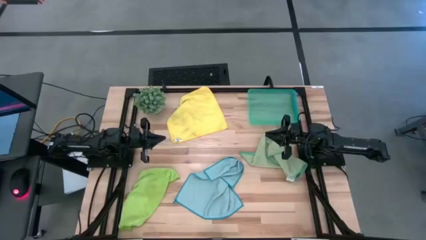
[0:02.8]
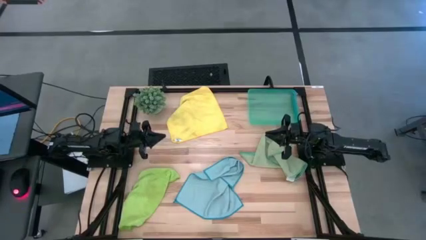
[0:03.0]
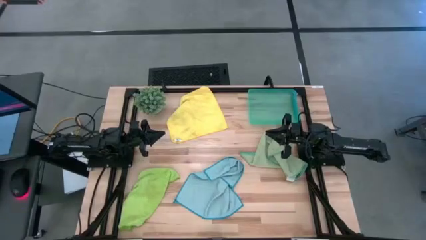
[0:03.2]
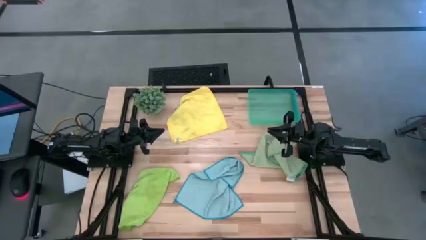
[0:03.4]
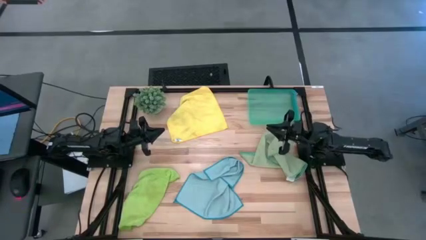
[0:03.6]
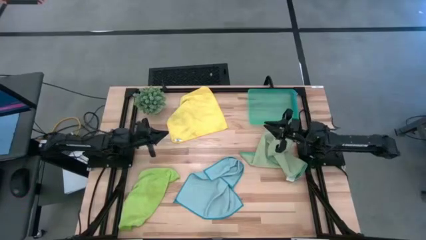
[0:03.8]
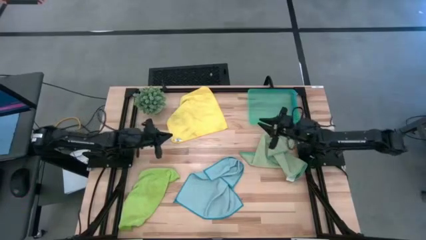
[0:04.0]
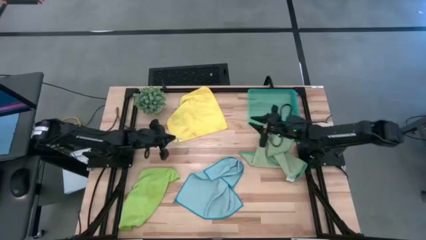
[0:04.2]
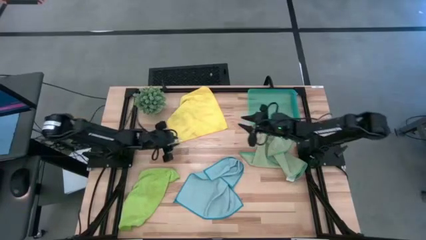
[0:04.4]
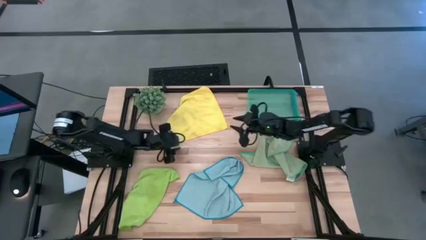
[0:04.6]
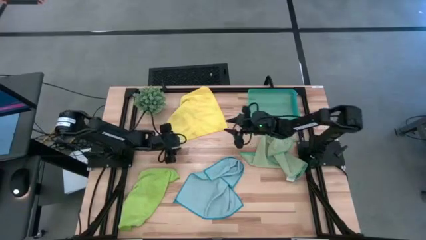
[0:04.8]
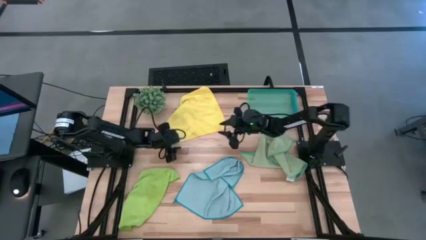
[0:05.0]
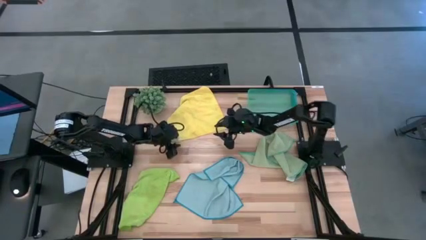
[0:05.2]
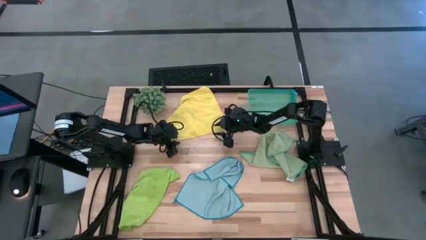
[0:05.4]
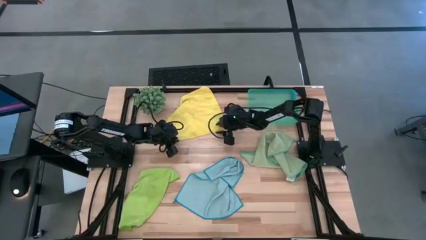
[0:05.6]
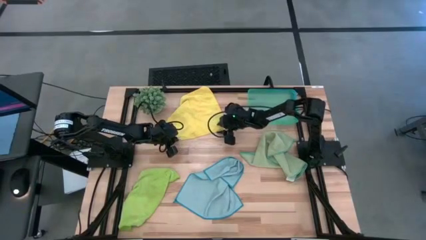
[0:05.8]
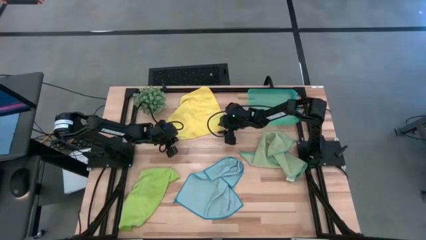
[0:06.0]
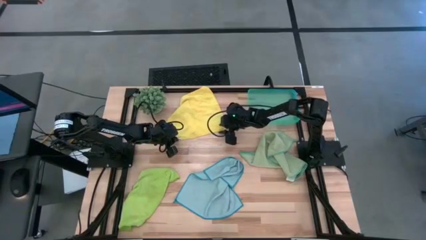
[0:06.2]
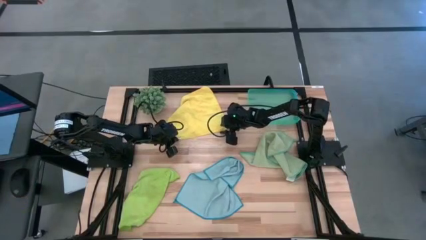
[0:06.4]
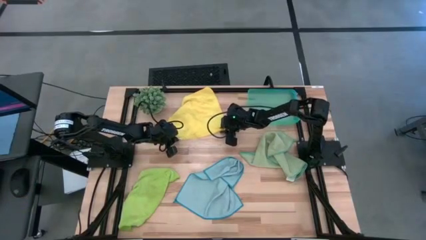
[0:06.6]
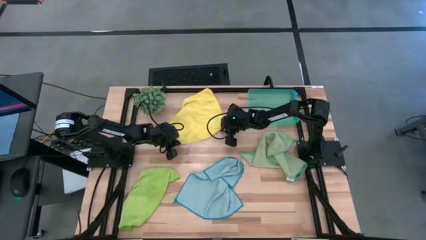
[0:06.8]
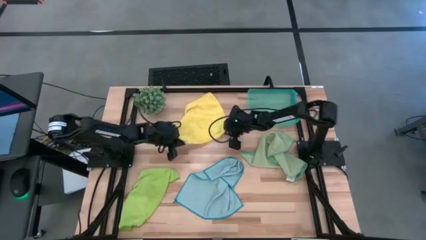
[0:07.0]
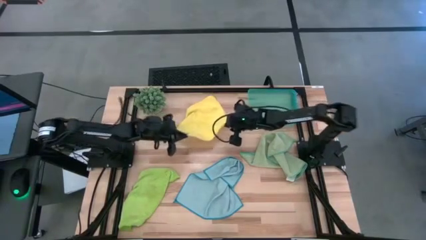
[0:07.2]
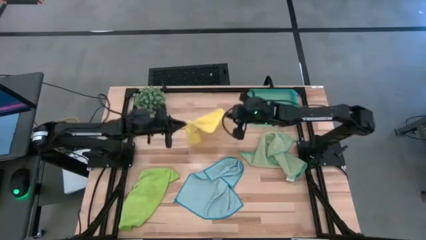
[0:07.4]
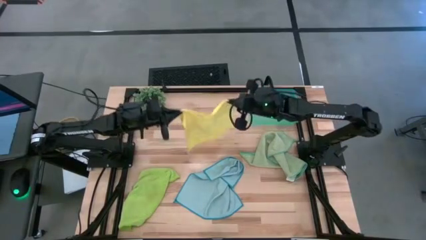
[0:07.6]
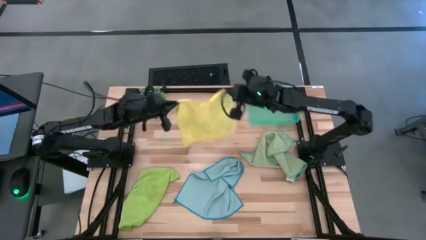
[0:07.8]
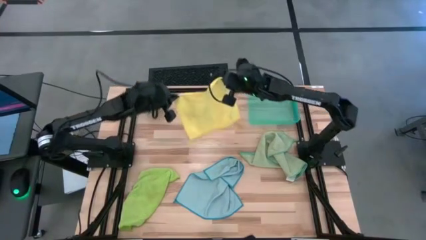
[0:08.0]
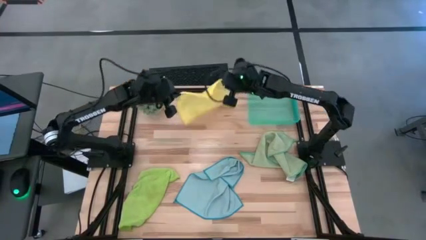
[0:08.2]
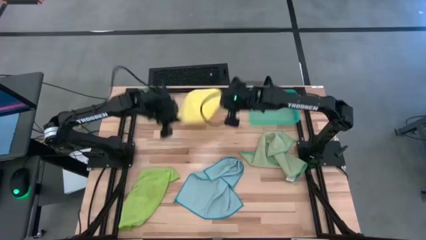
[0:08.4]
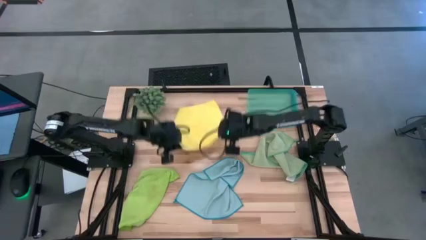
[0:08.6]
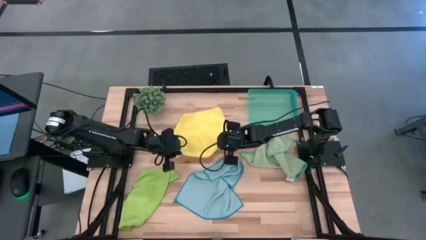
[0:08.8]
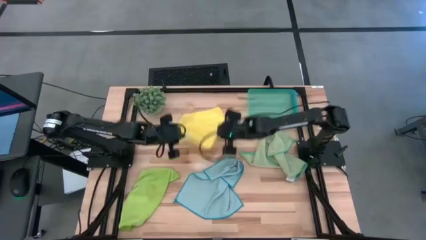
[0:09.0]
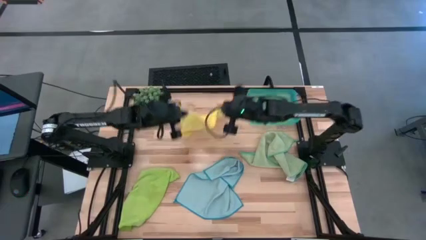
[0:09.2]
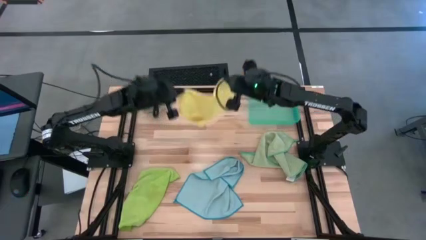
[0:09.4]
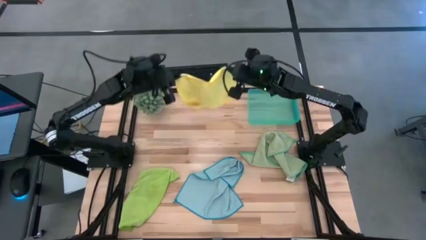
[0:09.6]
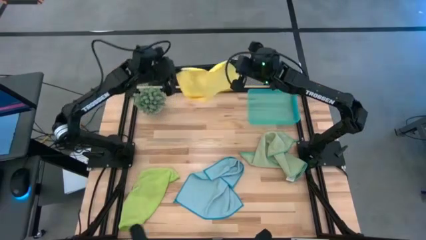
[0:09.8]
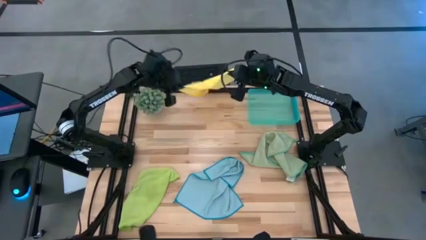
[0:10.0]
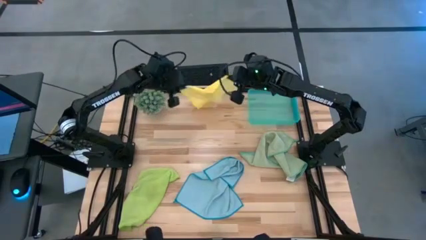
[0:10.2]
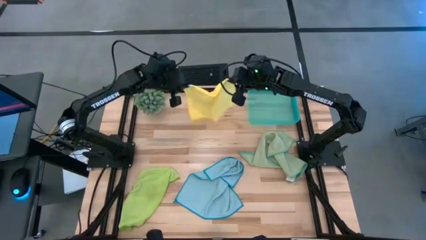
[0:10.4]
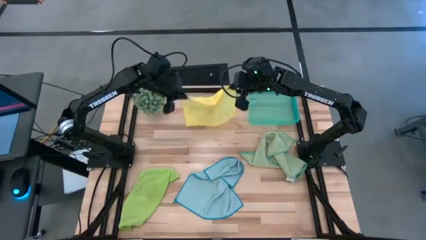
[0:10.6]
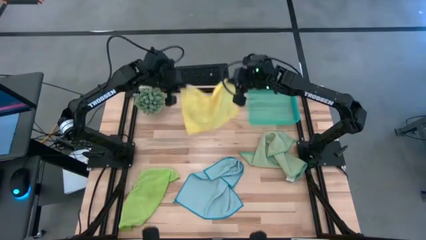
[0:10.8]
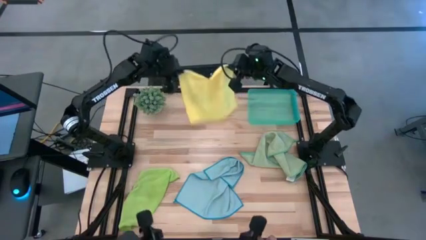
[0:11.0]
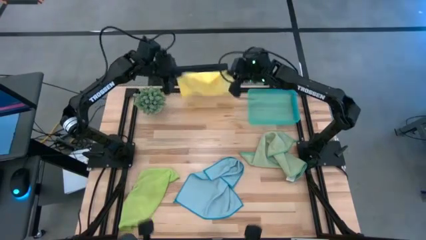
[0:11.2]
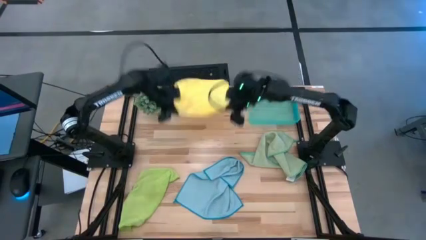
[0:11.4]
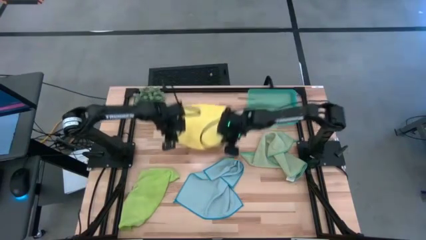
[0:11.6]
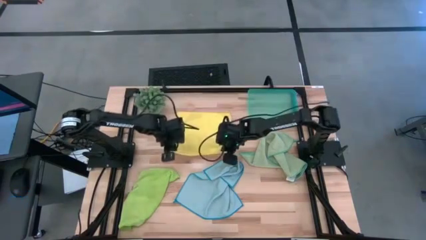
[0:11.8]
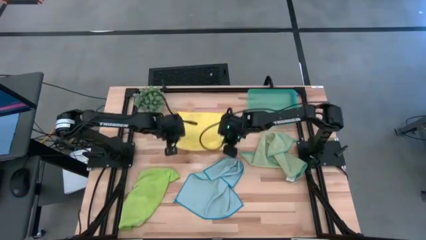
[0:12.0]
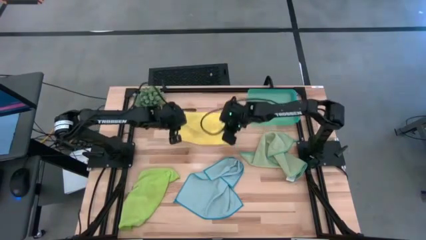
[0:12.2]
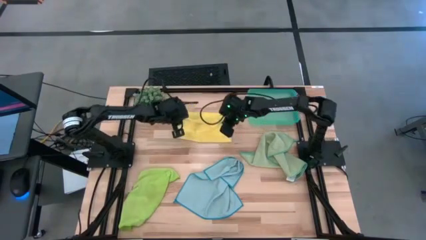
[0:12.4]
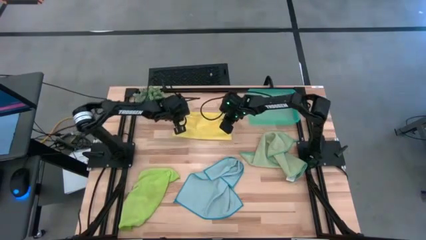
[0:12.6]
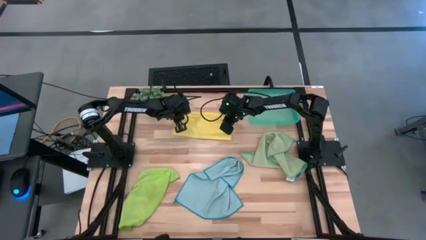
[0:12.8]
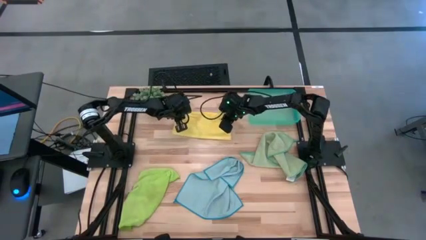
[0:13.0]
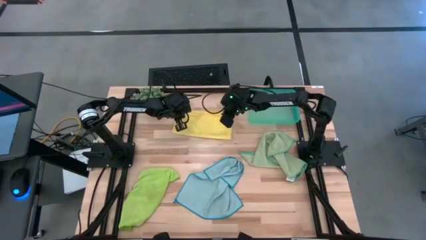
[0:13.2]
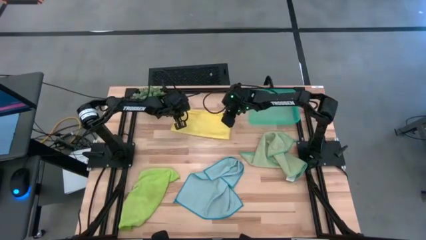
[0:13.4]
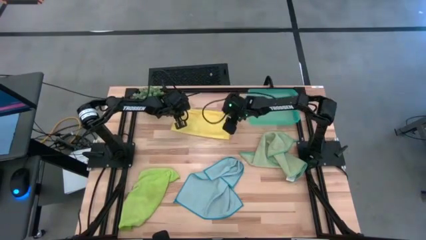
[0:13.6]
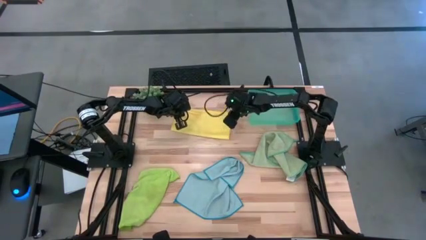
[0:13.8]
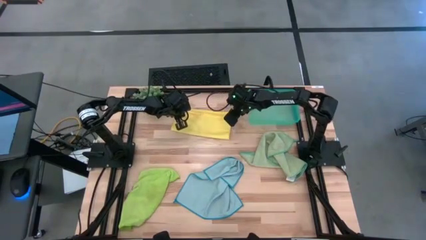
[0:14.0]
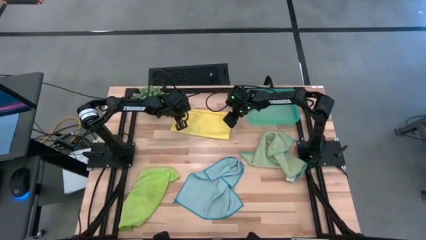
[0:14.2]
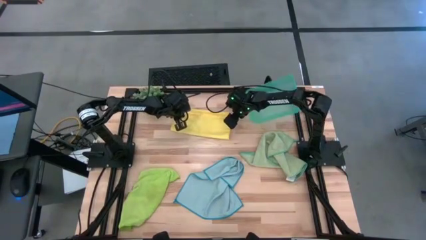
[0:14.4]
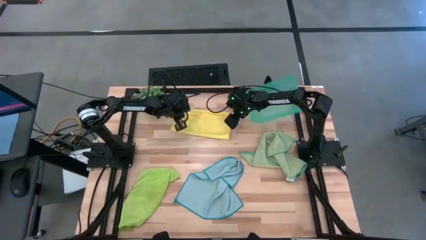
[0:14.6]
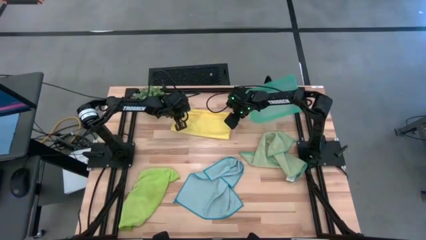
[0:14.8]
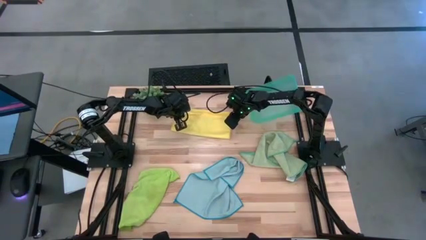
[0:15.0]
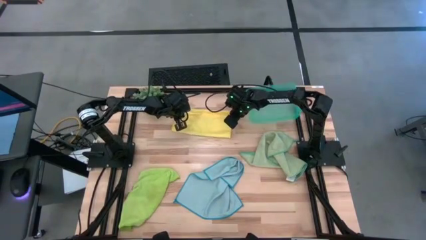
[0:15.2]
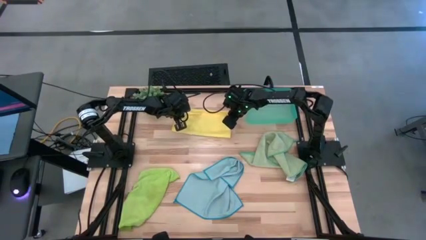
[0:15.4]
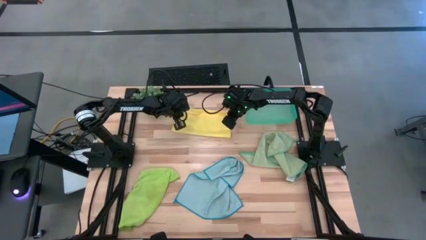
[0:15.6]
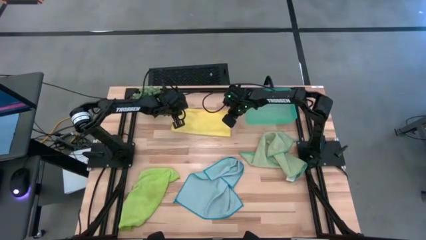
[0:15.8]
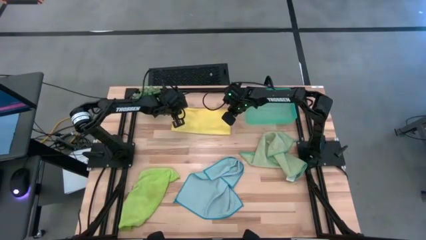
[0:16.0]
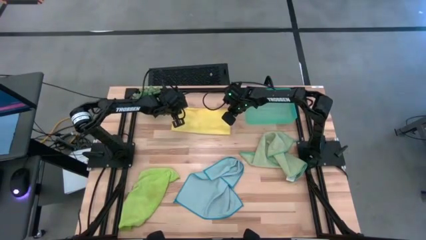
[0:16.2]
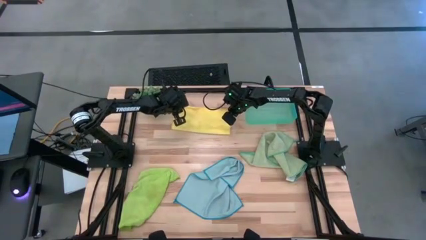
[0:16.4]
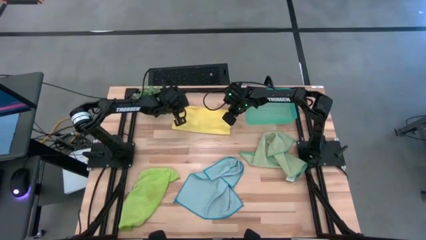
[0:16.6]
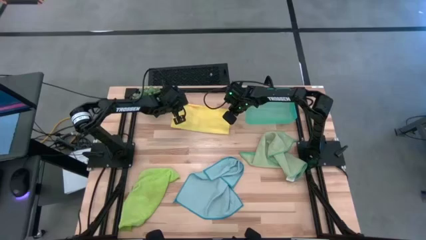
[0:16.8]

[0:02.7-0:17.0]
Task: Fold microfiber towels
Fold the yellow microfiber cloth
